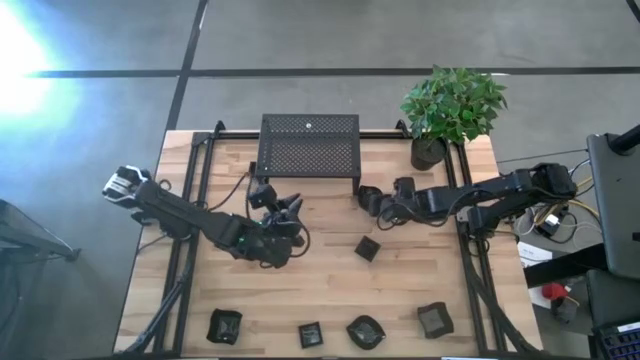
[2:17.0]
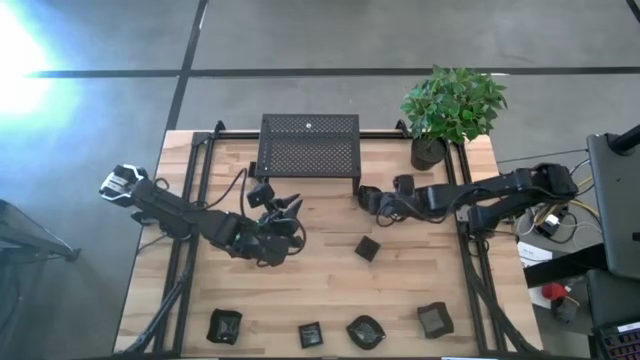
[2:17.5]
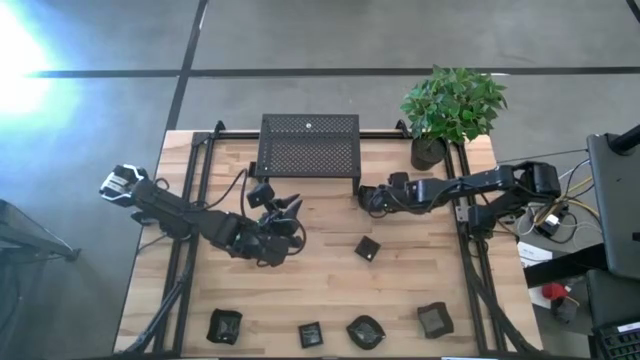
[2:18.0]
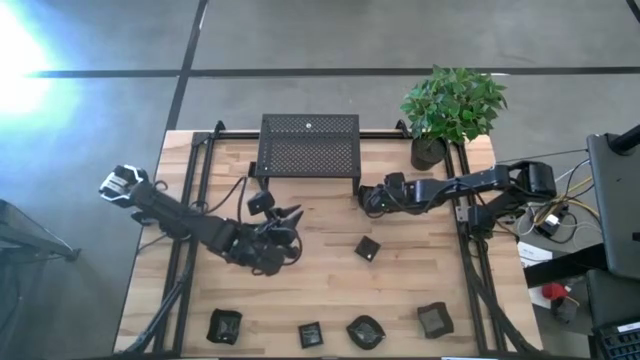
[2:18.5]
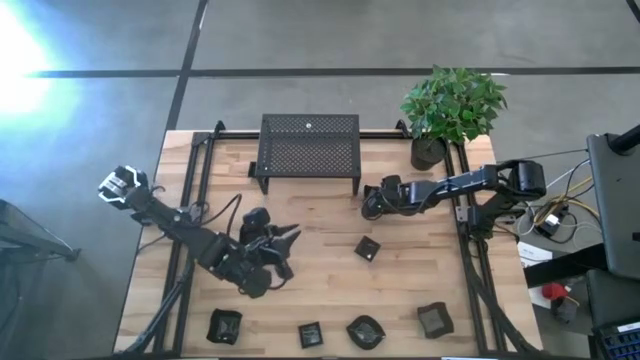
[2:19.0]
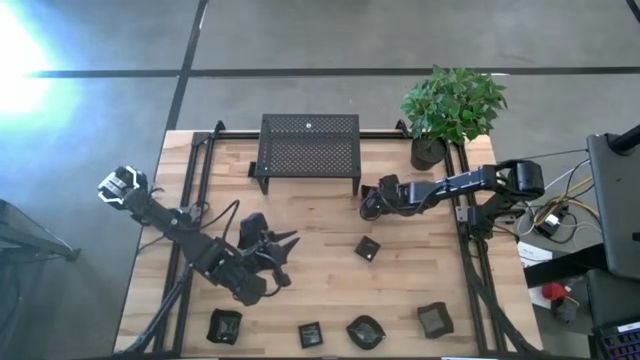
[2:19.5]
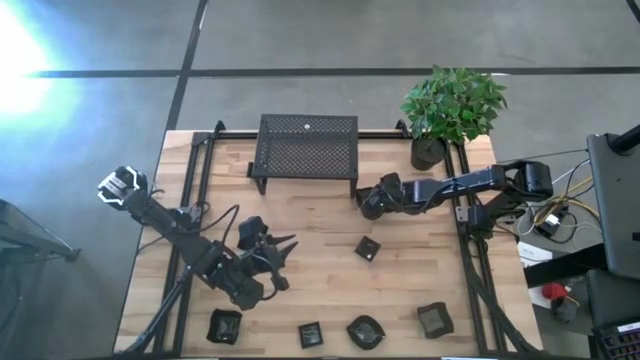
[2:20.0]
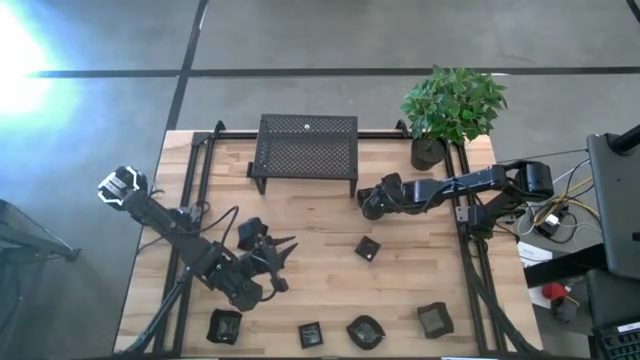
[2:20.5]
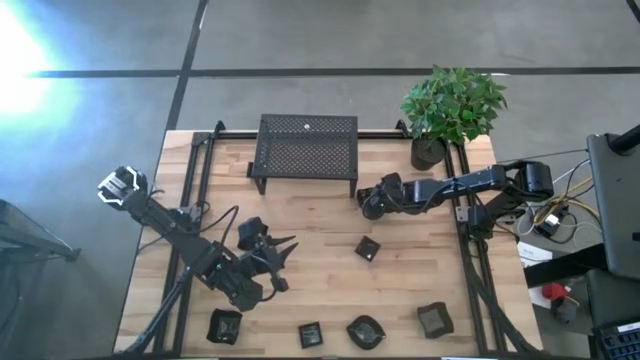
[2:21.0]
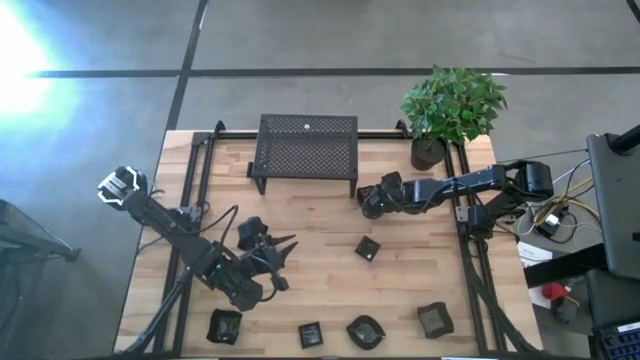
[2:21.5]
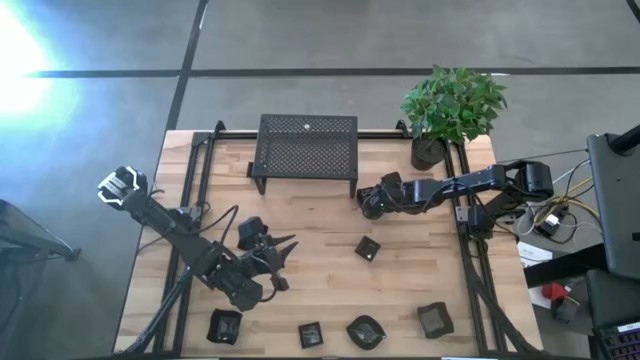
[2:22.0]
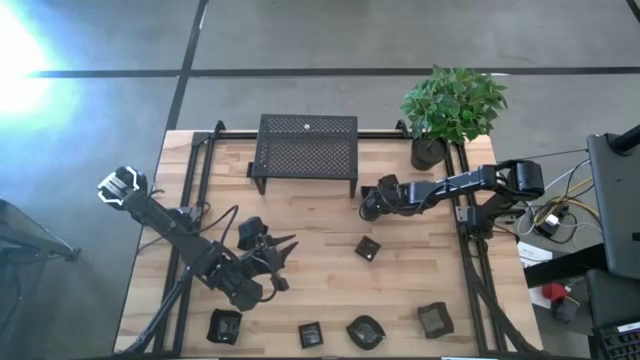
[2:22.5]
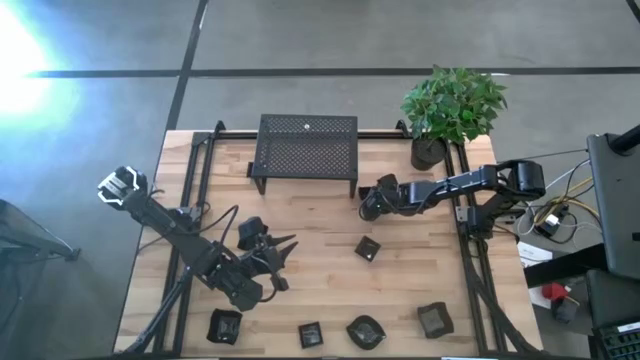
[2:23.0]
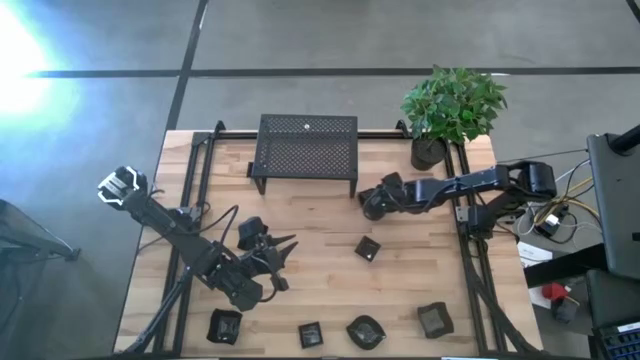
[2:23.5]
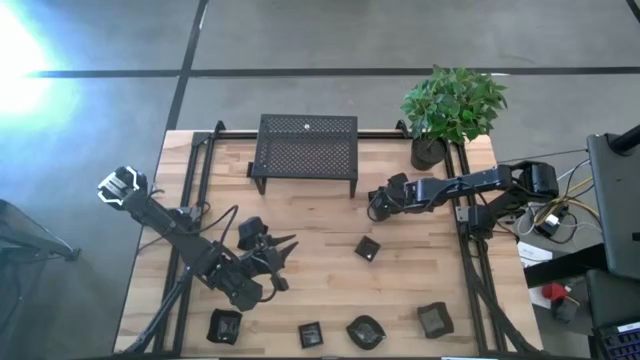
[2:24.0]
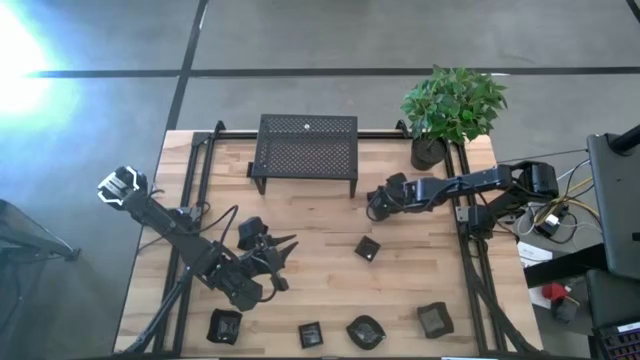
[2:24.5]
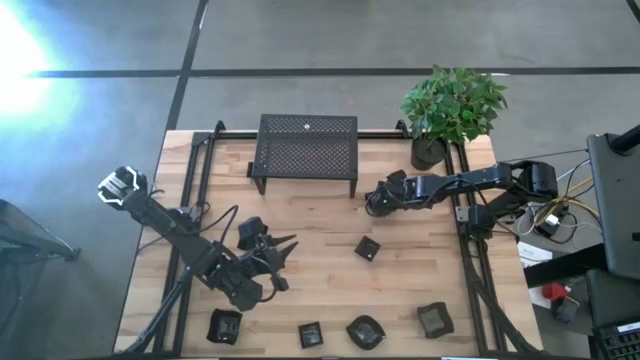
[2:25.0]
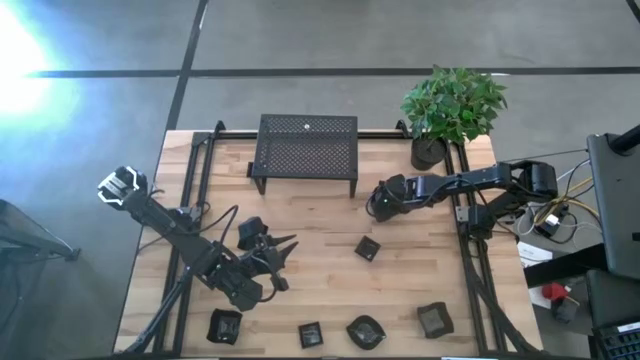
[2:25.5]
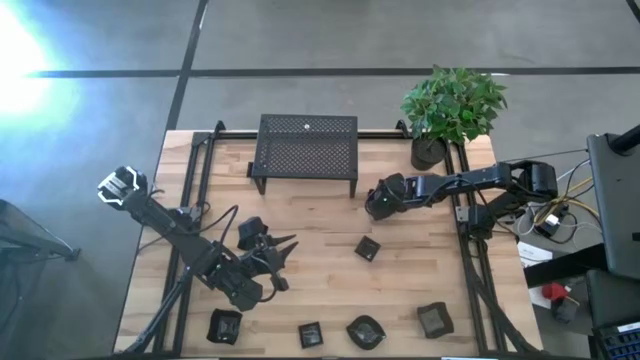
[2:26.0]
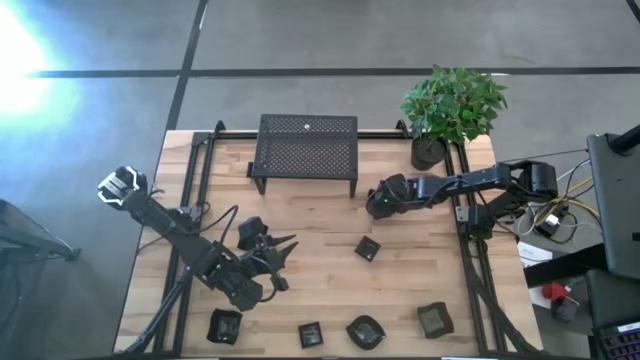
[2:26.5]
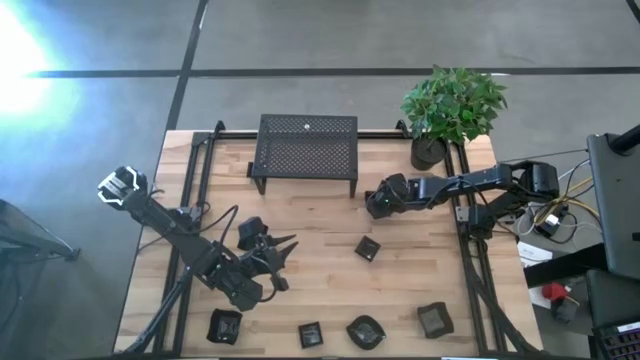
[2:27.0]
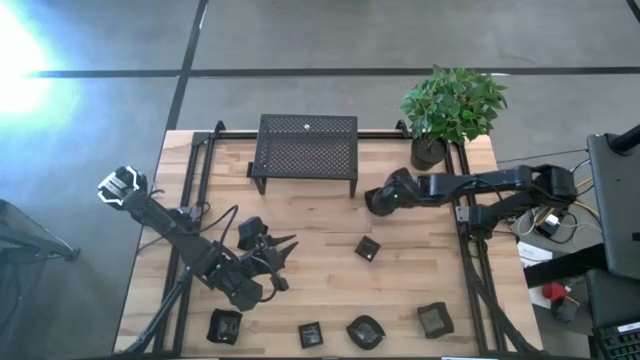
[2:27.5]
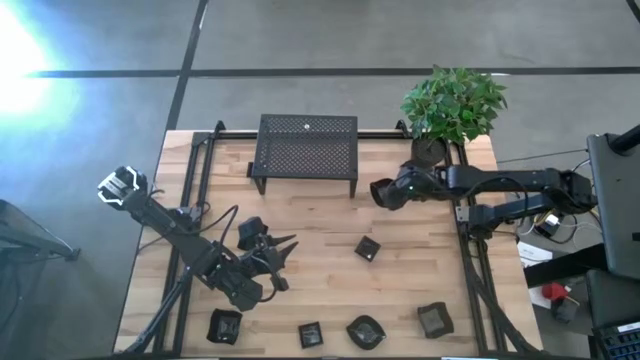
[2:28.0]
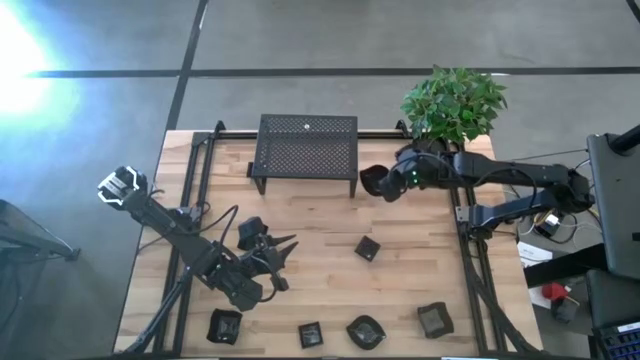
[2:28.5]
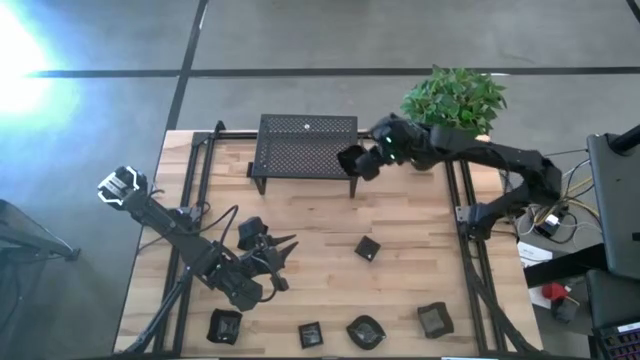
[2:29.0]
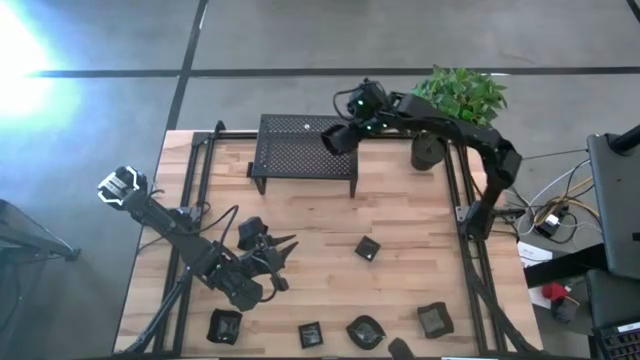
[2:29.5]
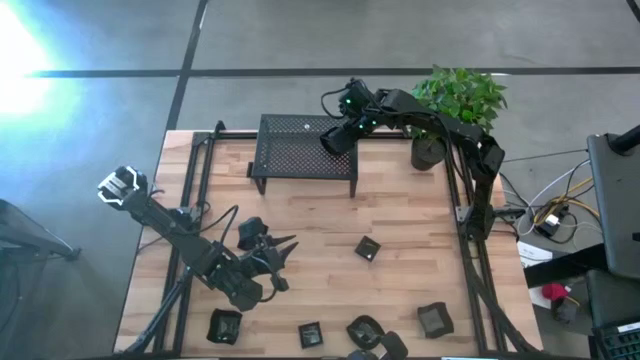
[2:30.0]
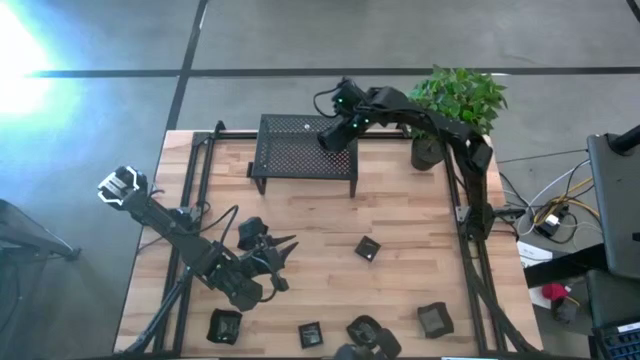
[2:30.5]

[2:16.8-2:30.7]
Task: Pick & Place Mini shaped plates
Put the stacked black leaf shaped plates on the shelf

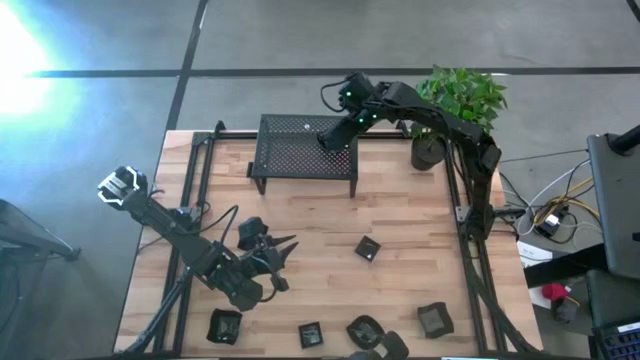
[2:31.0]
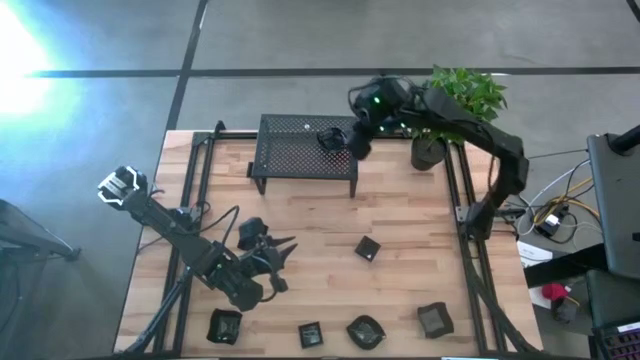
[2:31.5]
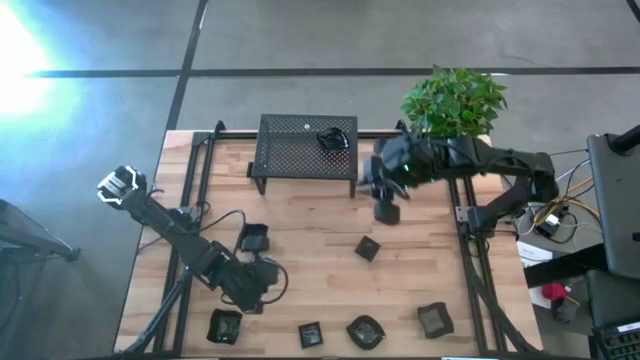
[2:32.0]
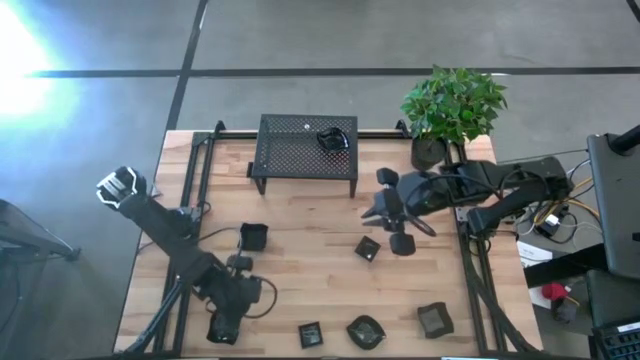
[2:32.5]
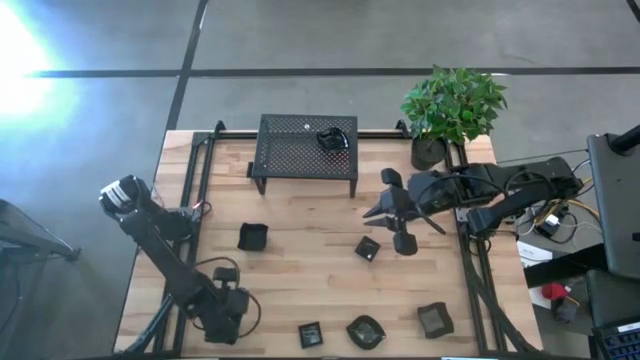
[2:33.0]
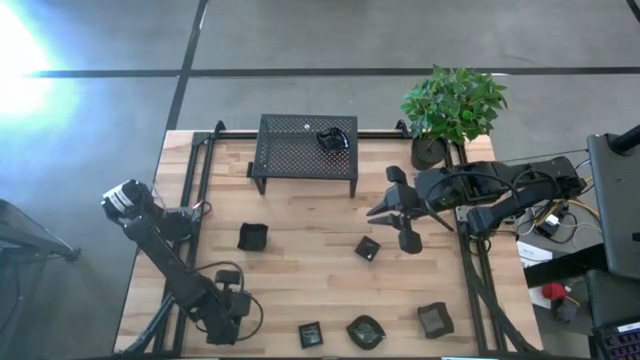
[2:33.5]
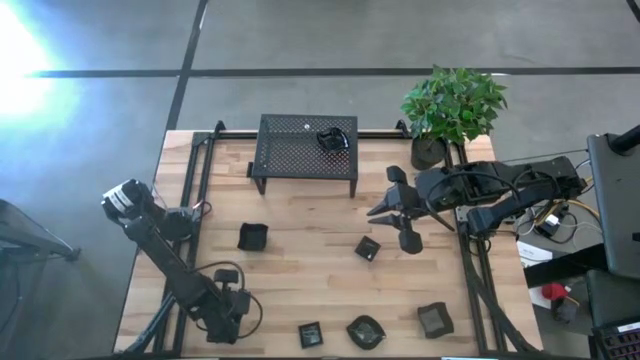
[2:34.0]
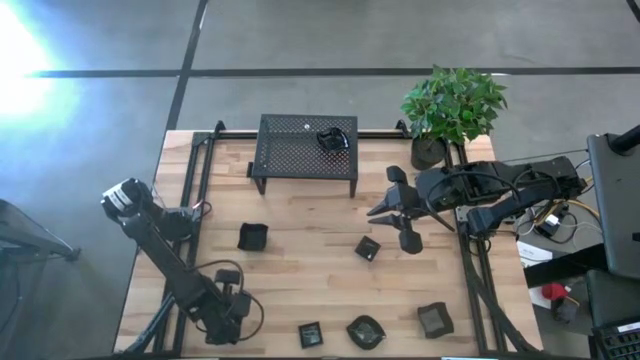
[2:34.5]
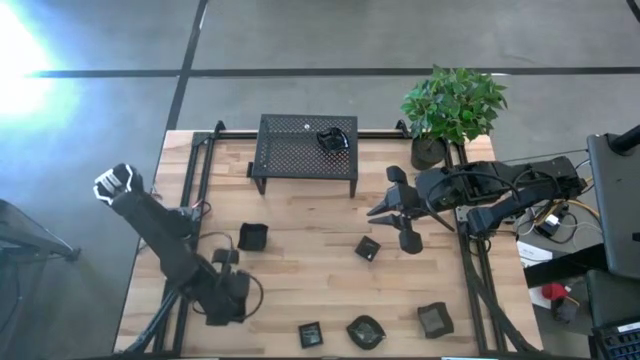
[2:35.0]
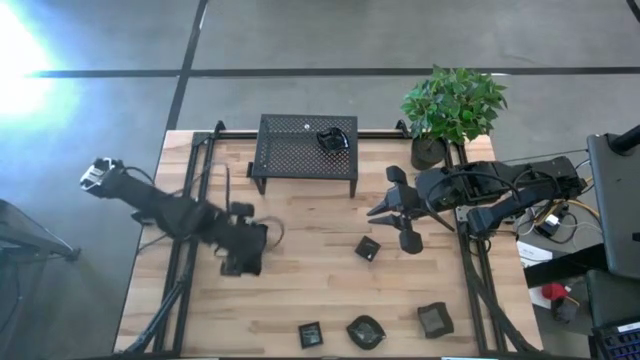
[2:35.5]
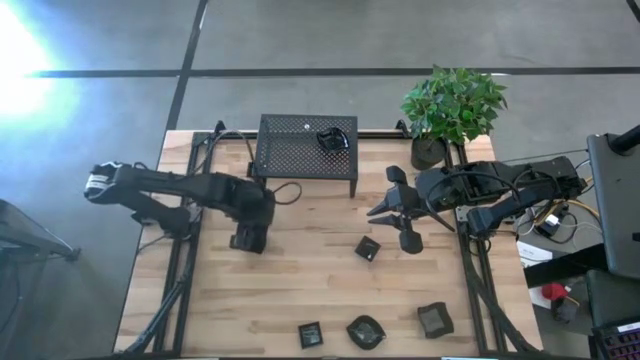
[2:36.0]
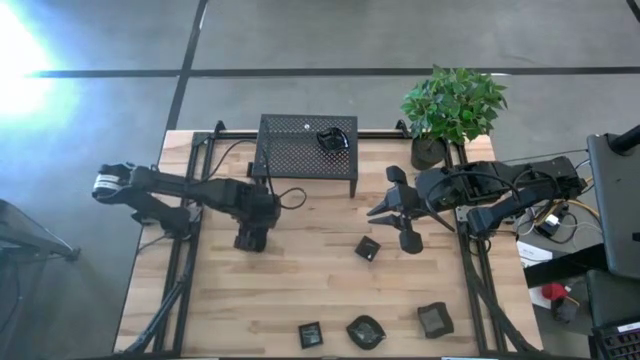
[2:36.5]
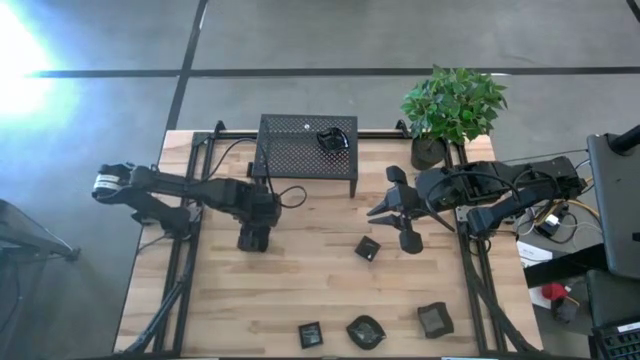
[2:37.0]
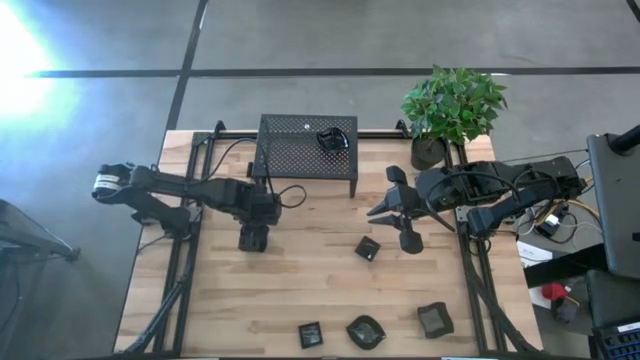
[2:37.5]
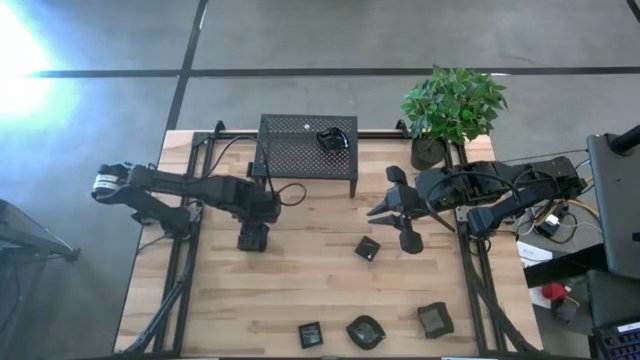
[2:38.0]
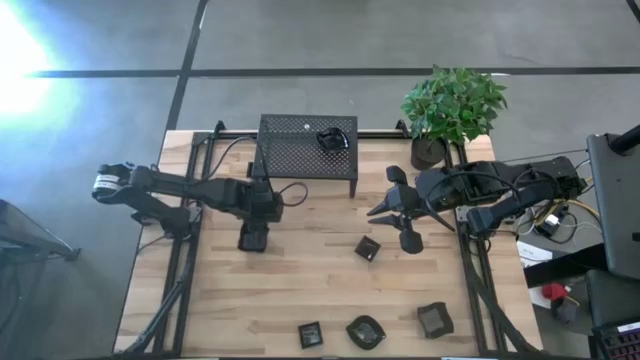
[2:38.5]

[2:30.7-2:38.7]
Stack the black distorted square plate on top of the other black distorted square plate
